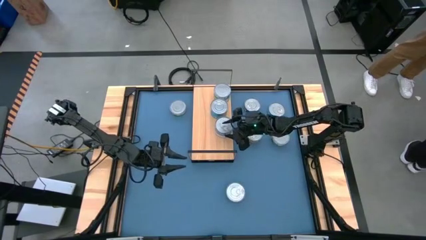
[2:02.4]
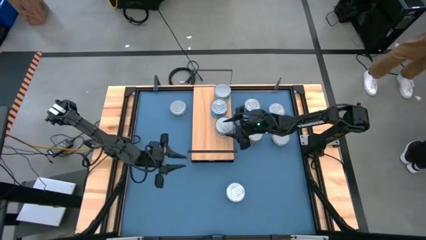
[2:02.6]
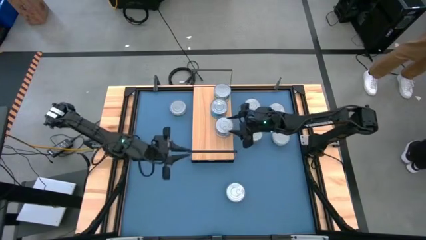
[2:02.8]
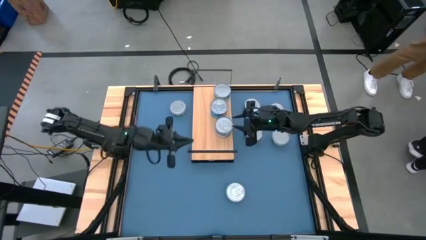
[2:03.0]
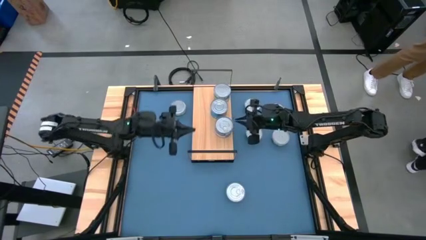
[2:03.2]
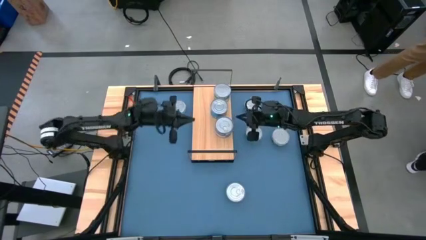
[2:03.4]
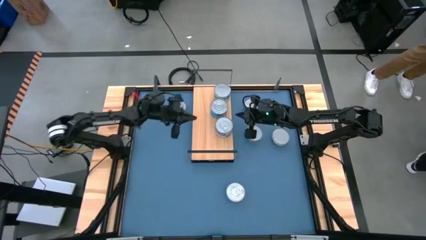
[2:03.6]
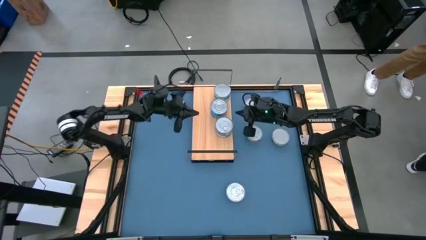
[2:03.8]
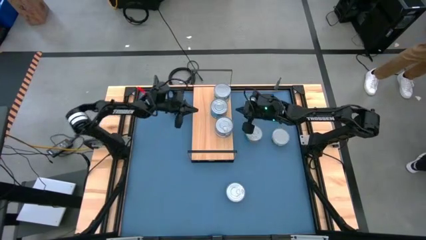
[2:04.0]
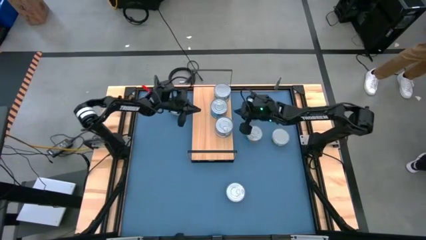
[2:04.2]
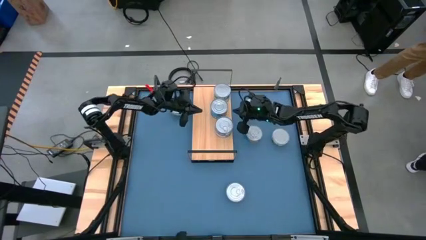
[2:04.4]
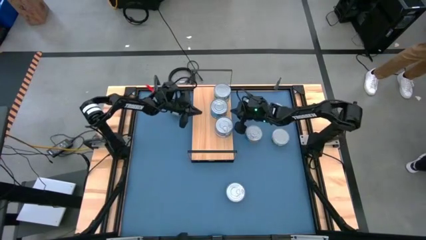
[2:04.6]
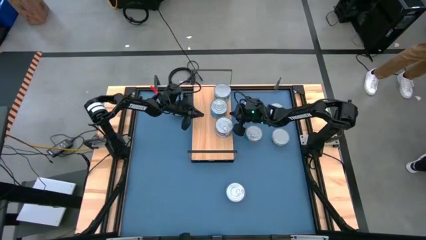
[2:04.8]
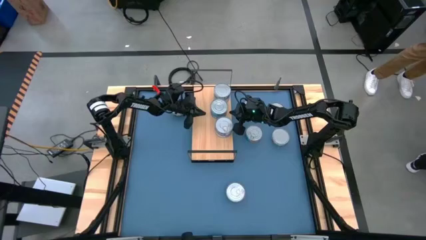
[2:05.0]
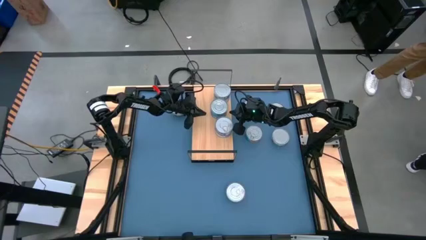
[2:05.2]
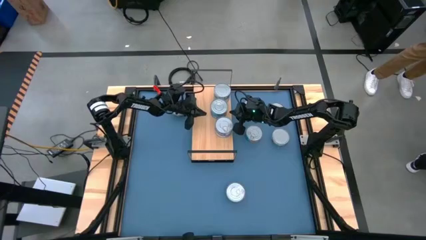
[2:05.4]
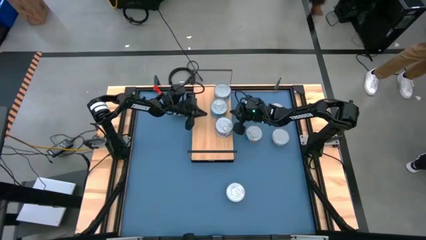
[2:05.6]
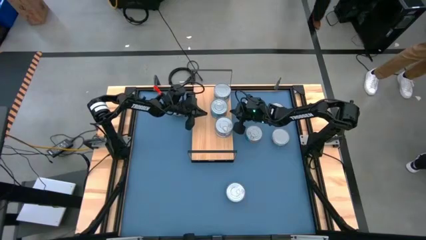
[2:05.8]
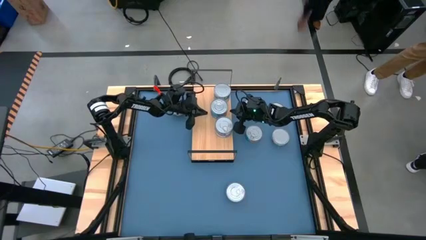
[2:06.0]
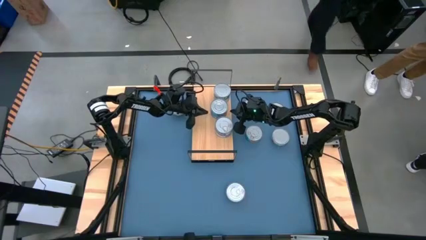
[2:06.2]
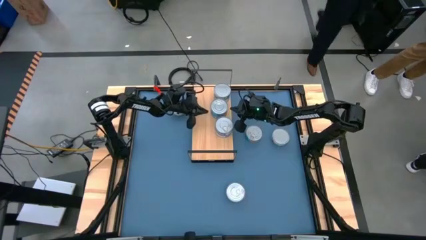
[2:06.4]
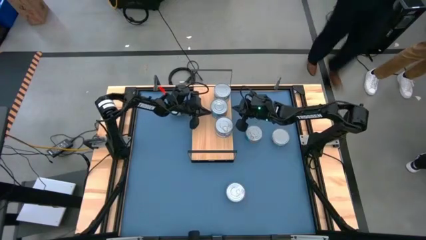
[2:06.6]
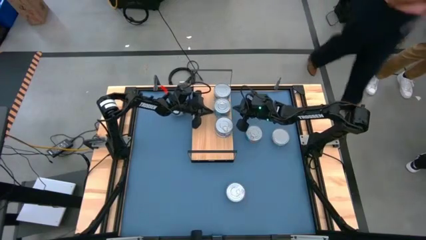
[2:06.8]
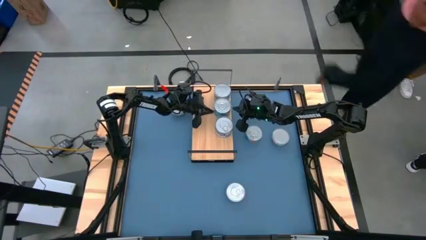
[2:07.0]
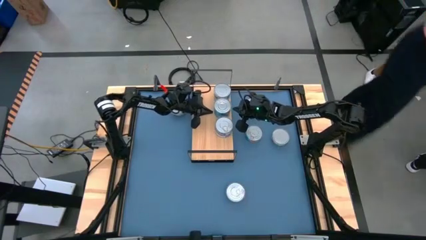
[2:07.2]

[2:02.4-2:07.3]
Task: Stack canned seafood by type on shelf
Adjust the stacked yellow blue tuna cans on the shelf

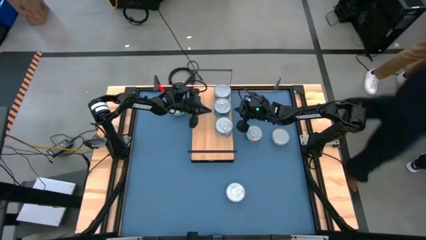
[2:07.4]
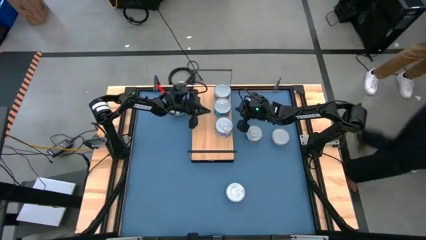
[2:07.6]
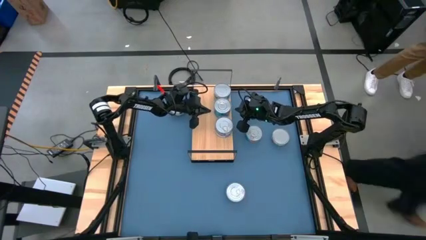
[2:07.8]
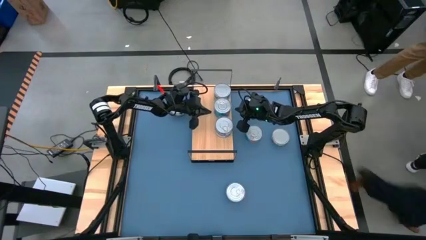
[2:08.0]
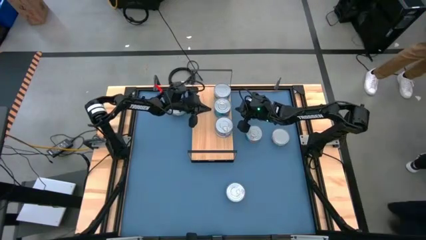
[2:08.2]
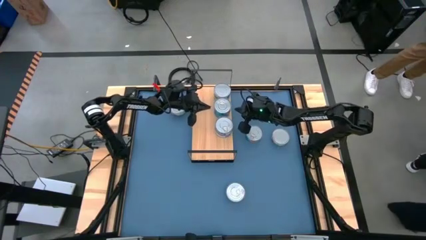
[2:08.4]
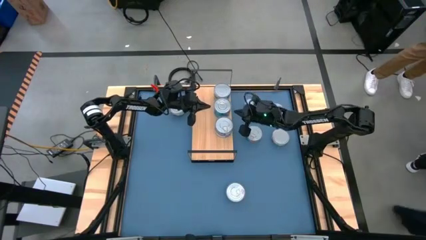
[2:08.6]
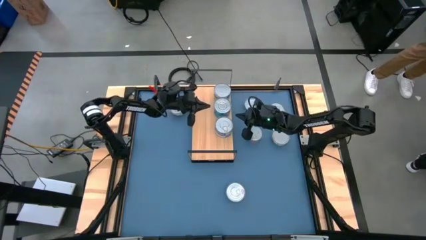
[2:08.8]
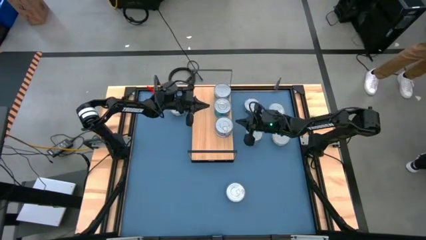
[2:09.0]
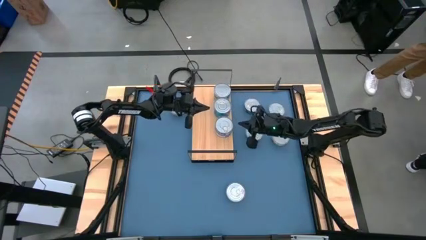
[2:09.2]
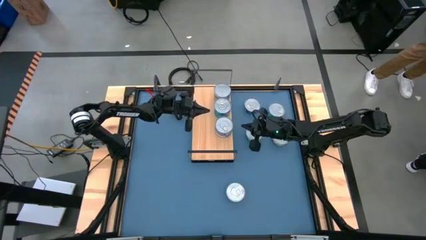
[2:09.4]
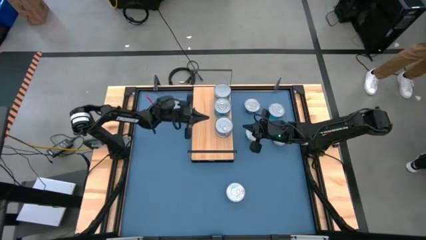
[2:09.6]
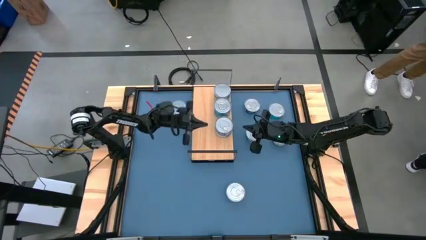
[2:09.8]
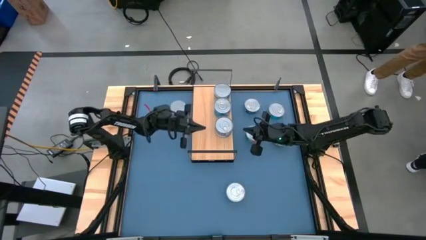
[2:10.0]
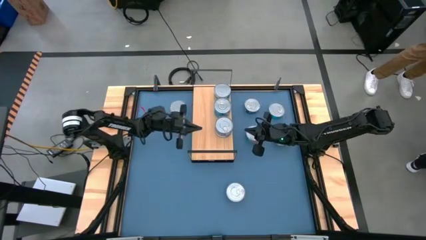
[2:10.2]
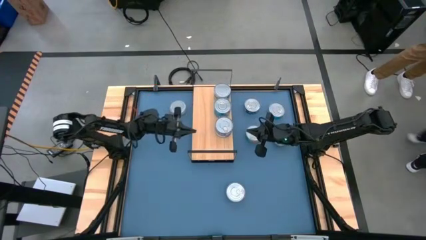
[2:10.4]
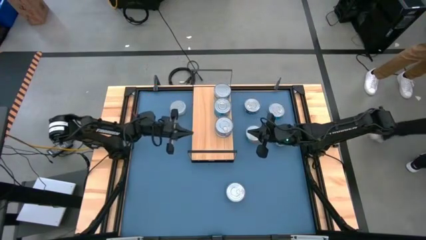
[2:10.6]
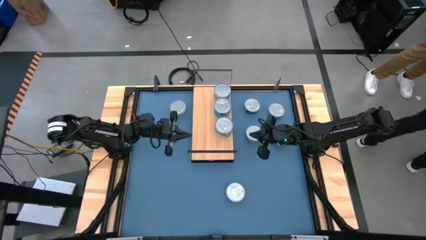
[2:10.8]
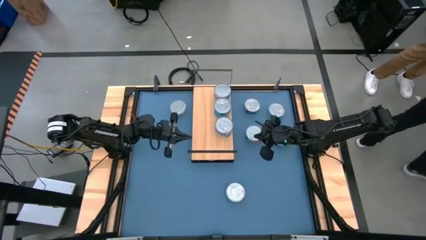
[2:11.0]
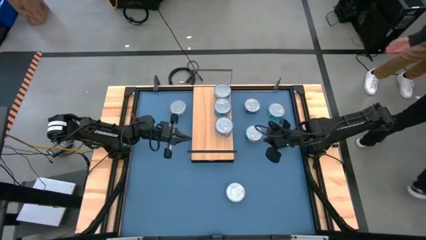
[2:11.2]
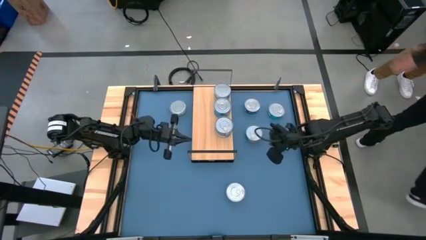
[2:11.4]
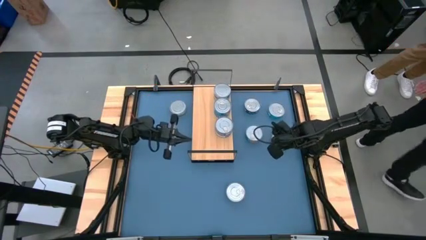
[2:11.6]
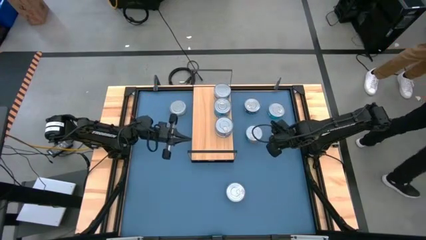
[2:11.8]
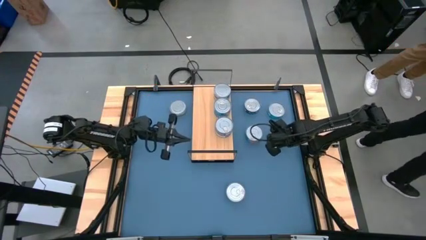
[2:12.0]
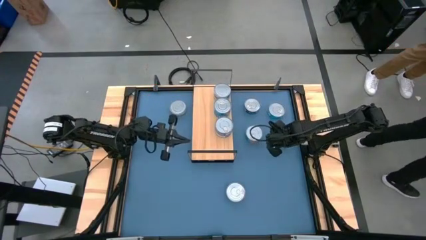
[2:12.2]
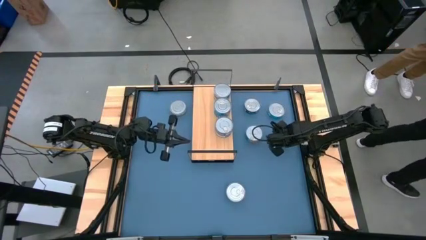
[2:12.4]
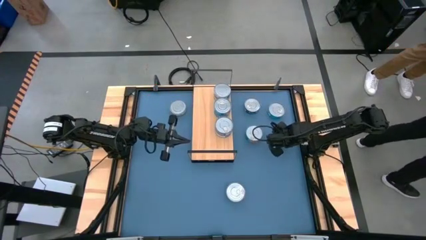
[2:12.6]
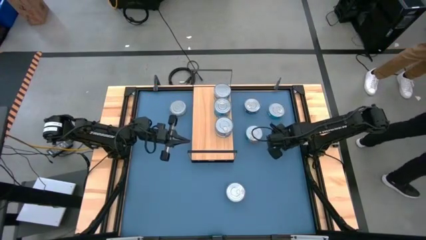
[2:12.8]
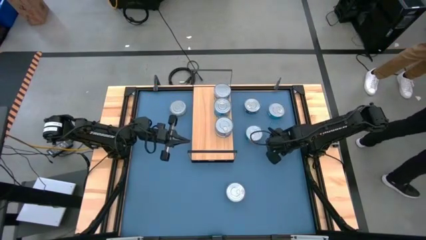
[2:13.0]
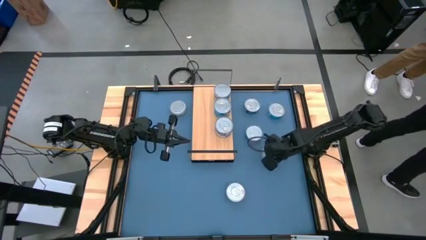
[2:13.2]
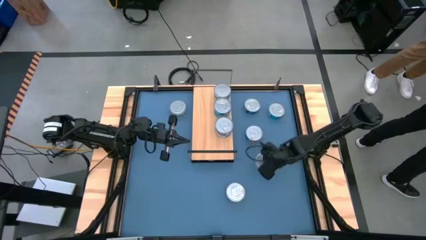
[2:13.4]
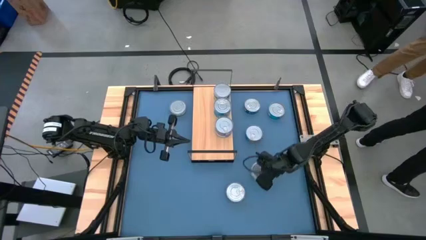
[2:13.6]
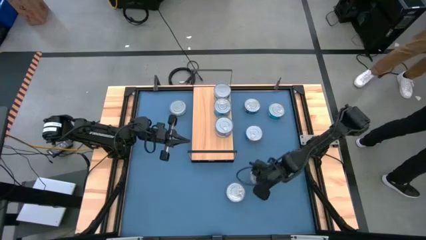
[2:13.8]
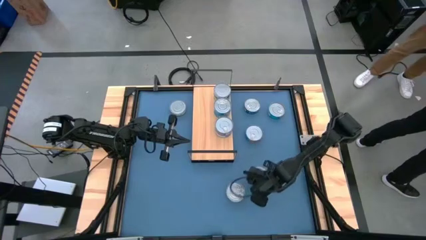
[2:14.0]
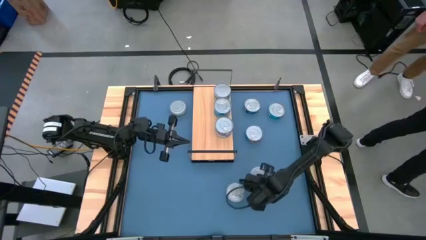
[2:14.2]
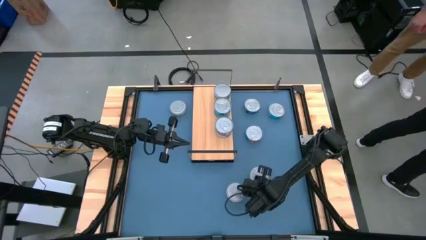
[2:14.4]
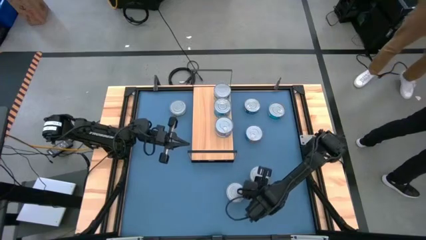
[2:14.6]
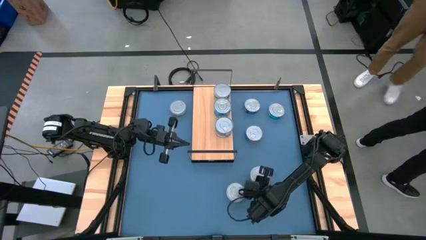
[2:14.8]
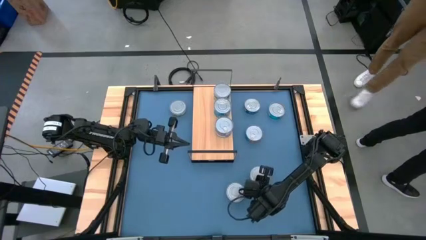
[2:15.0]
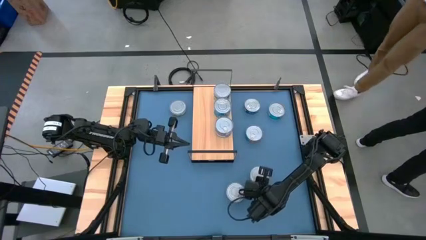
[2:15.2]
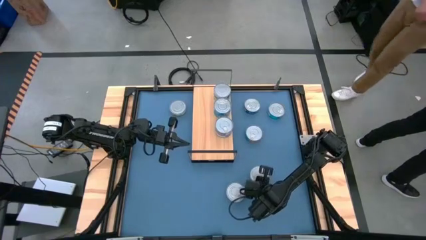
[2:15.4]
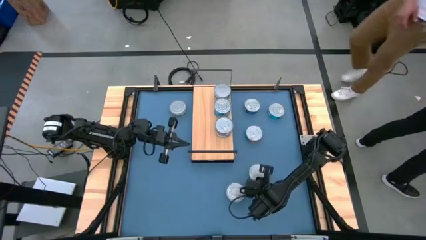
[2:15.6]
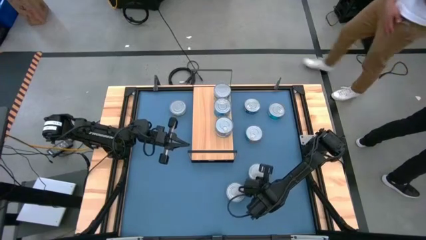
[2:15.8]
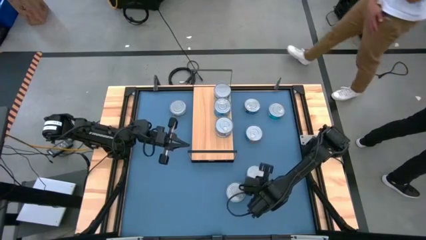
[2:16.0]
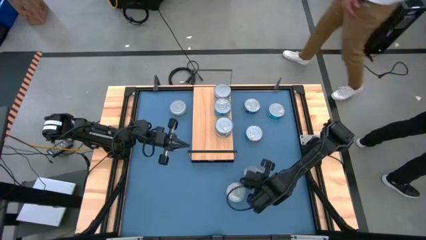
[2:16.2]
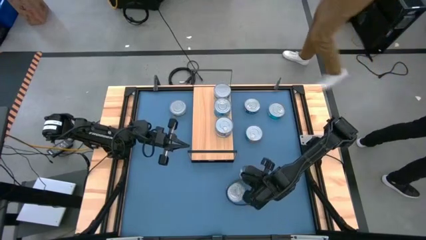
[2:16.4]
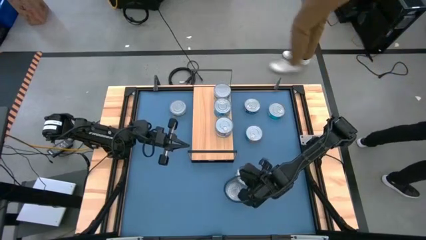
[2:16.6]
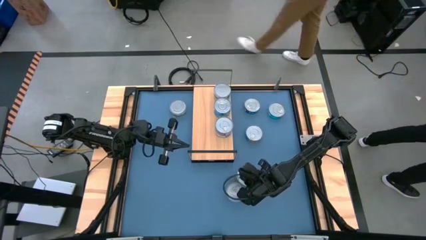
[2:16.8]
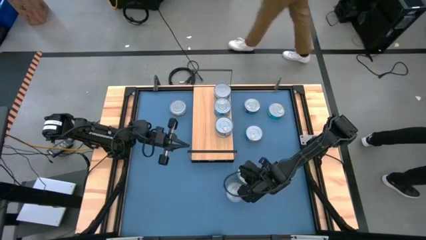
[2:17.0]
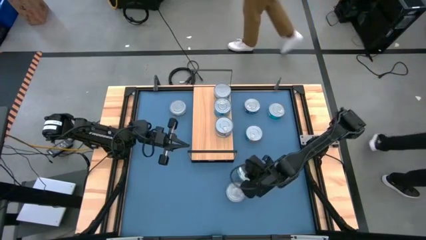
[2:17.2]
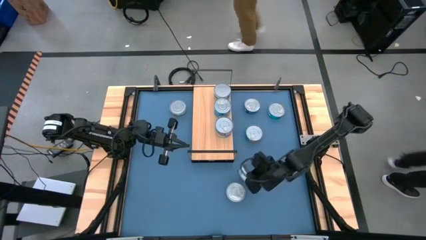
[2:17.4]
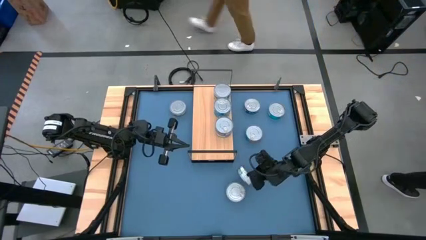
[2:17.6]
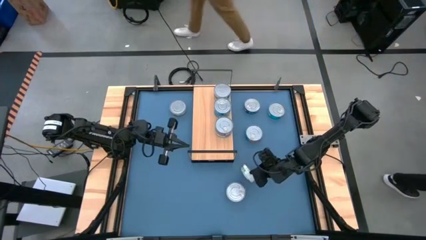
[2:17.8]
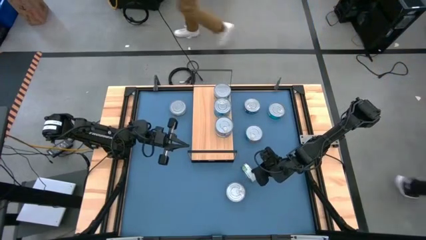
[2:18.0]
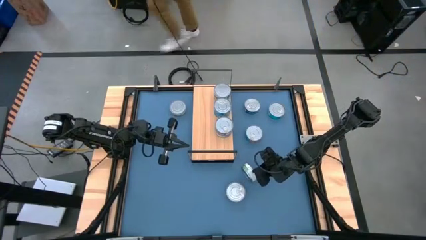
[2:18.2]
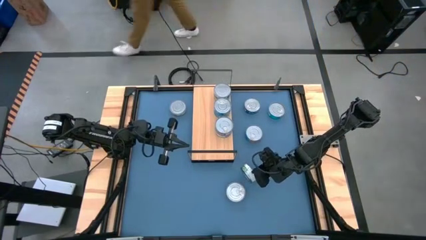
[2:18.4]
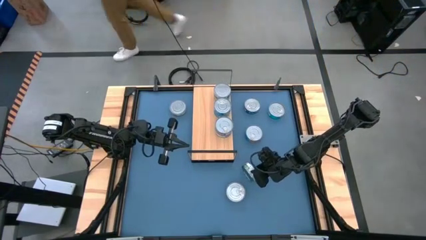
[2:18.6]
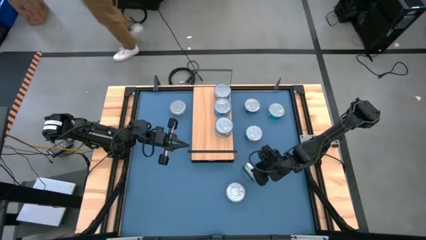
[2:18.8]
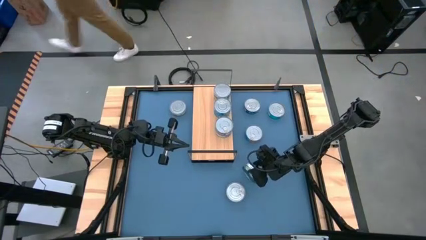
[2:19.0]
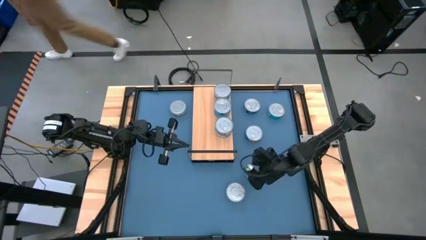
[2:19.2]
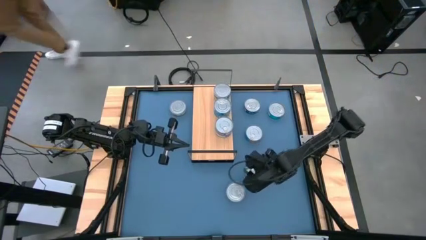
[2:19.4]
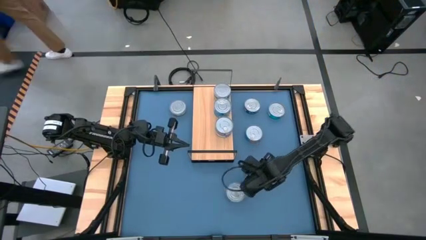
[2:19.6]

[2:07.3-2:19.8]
Put the green tuna can on the shelf aligned with the other green tuna can
